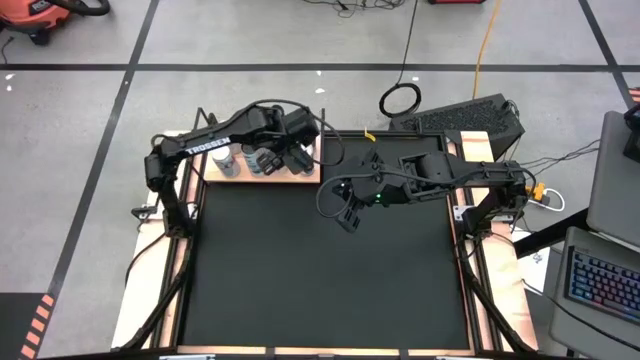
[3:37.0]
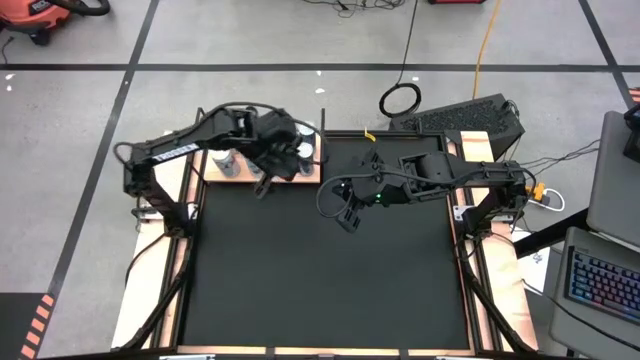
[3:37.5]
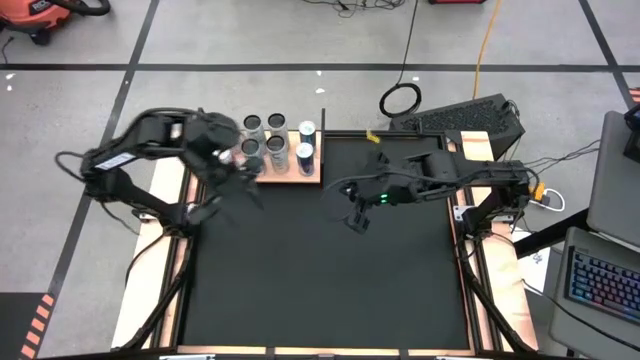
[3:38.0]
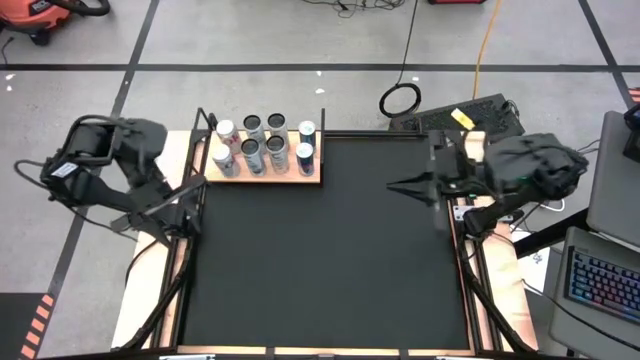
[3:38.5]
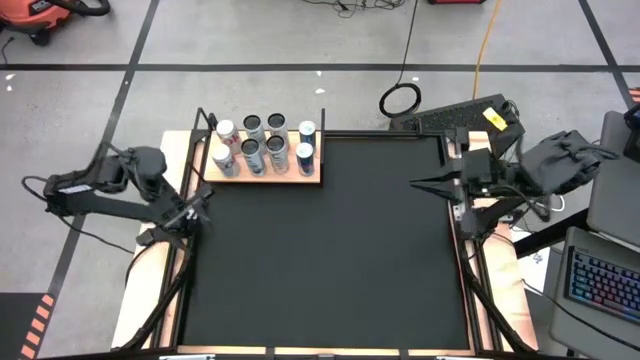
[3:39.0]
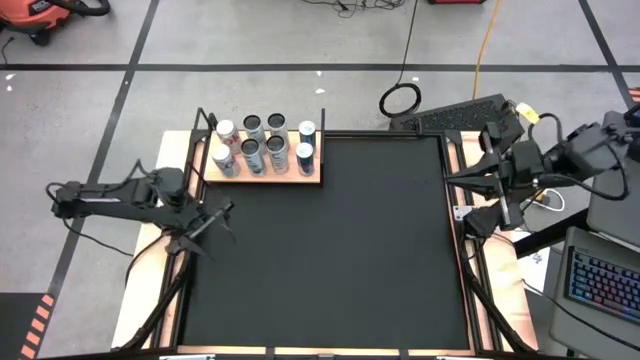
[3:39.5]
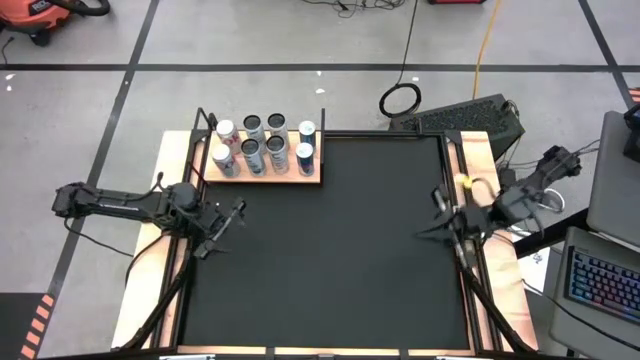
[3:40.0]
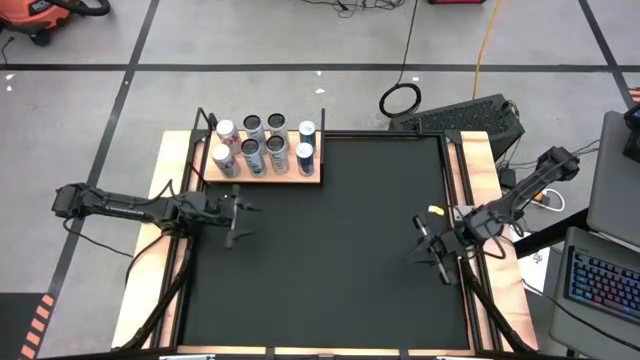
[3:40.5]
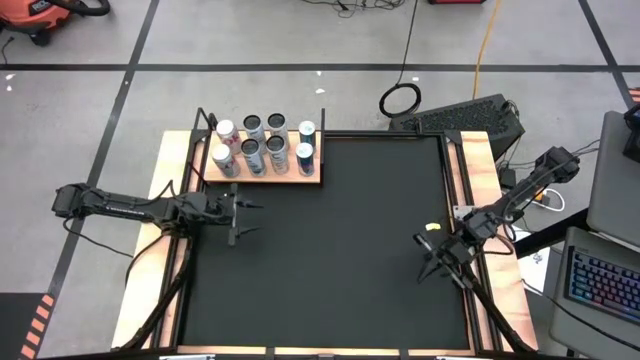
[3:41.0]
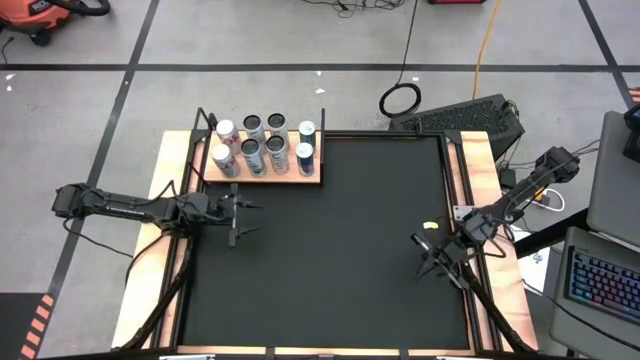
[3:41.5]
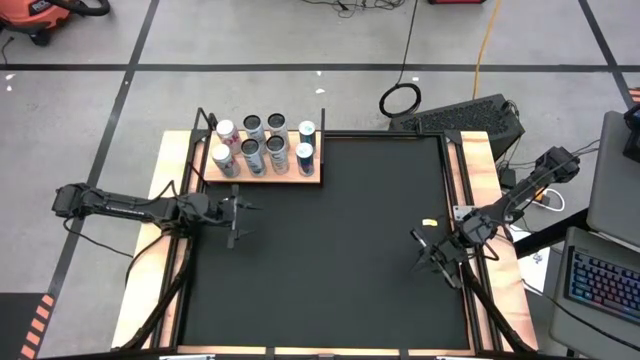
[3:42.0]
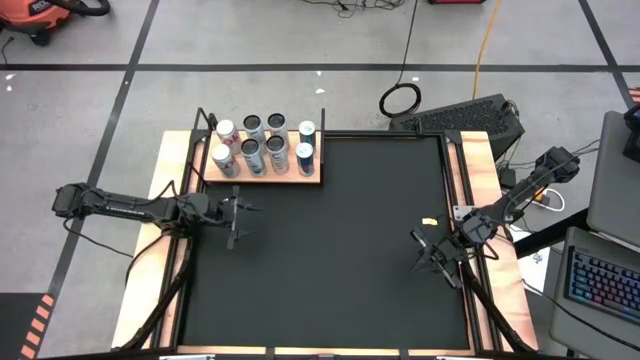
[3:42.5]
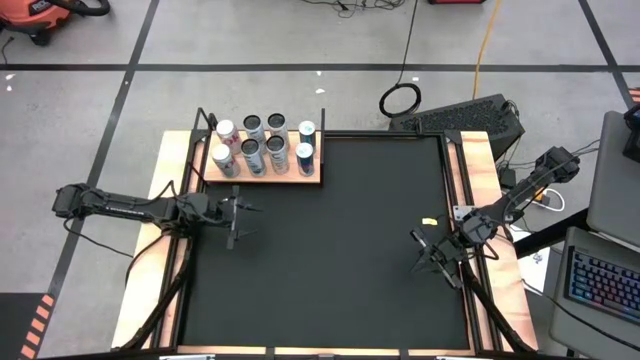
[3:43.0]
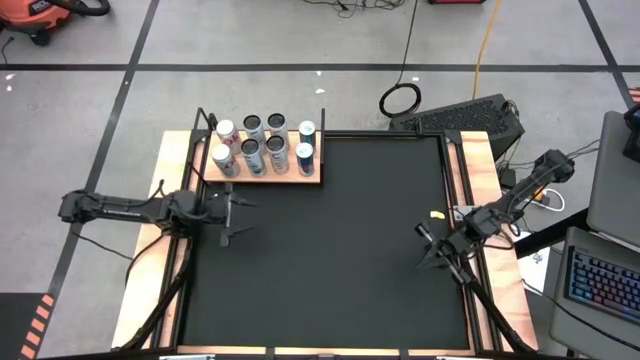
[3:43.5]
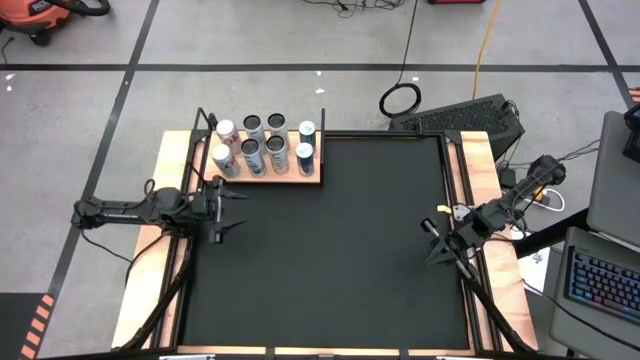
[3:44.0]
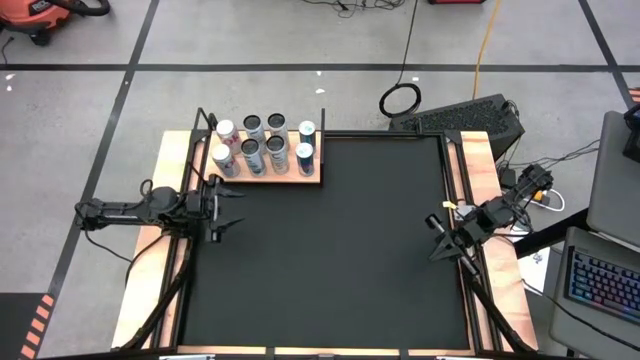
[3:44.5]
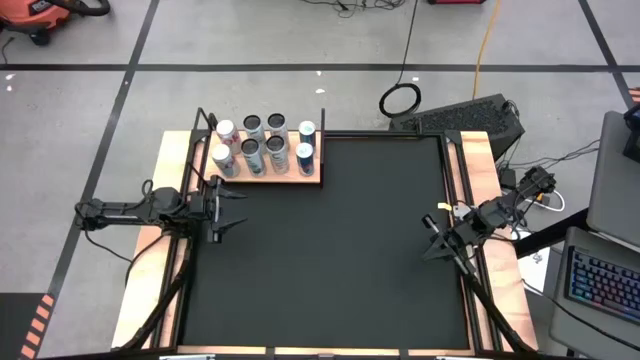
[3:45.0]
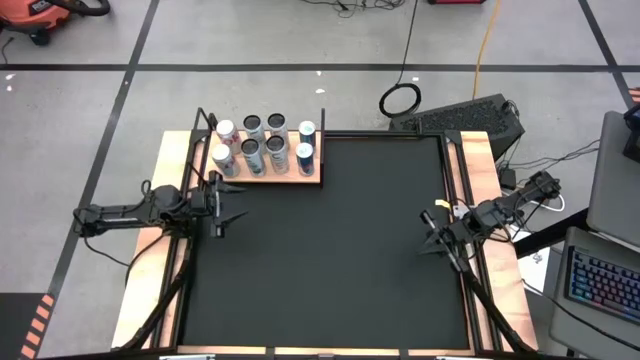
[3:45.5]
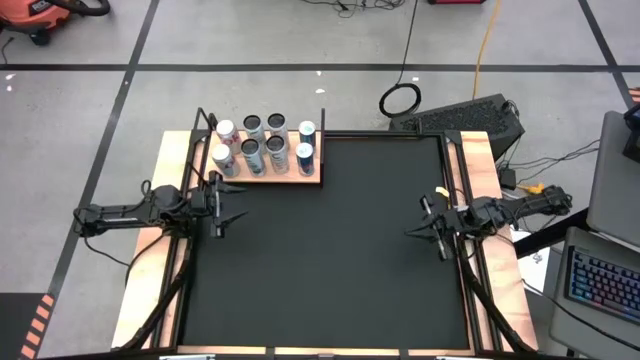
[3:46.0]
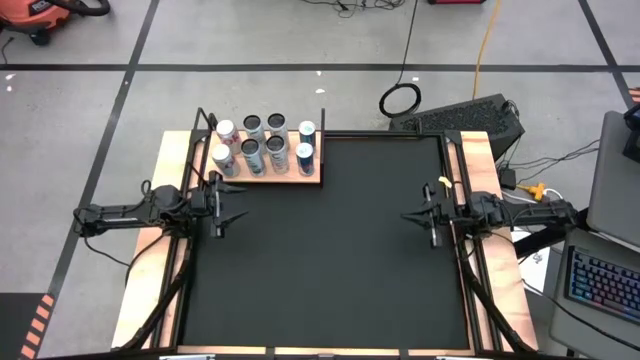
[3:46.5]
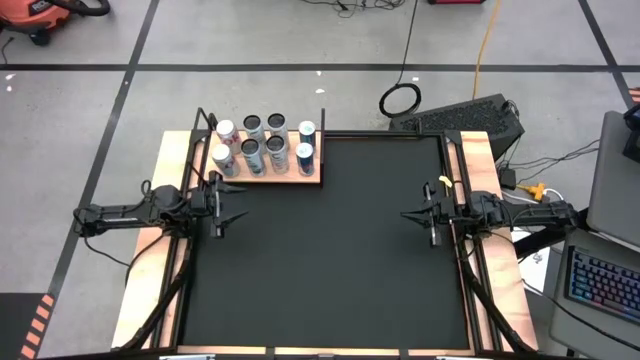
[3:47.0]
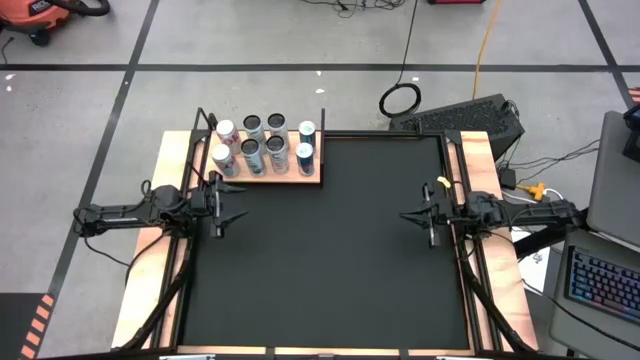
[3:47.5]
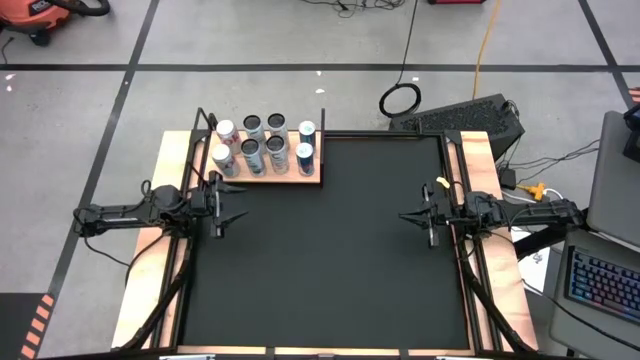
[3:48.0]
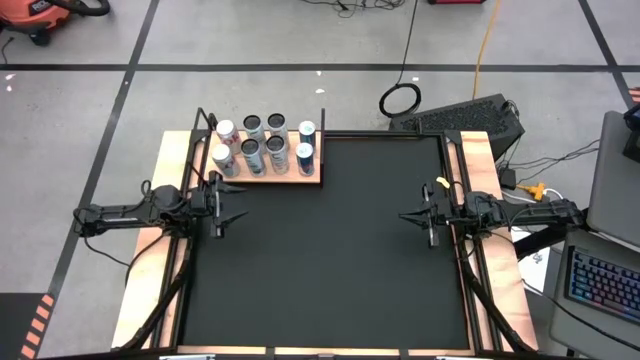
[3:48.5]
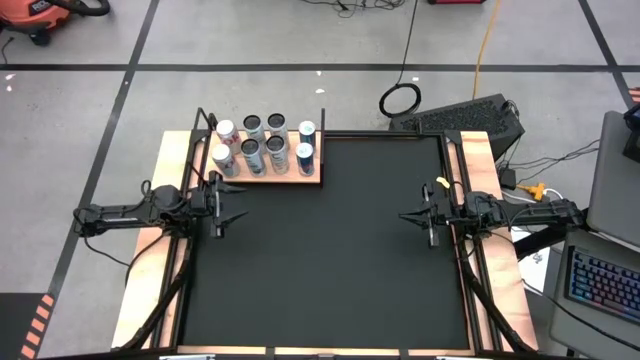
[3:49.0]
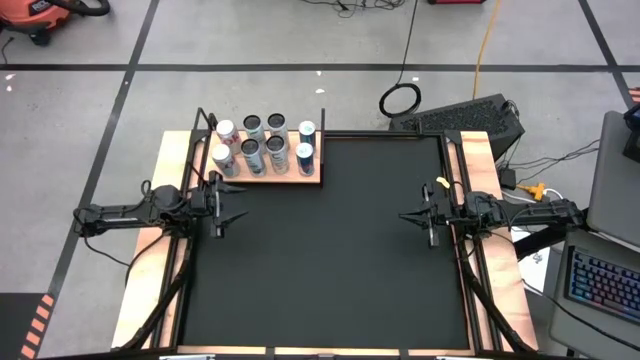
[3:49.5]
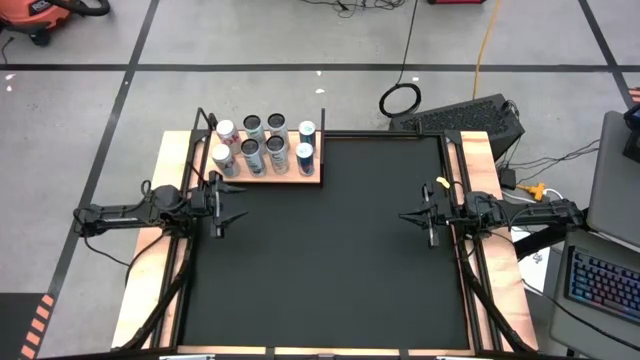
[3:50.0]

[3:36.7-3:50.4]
Task: Place canned beverage on shelf
Return to Home Position

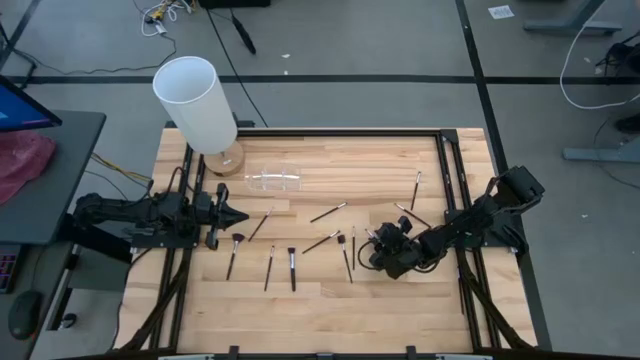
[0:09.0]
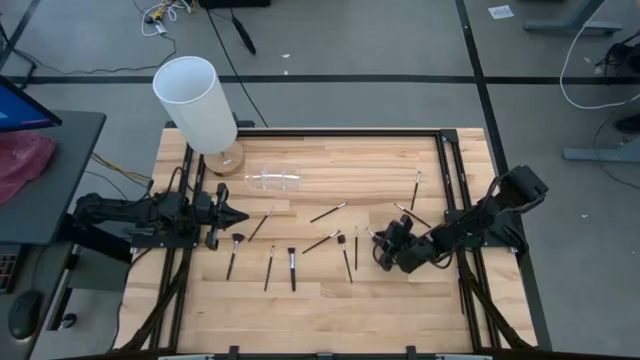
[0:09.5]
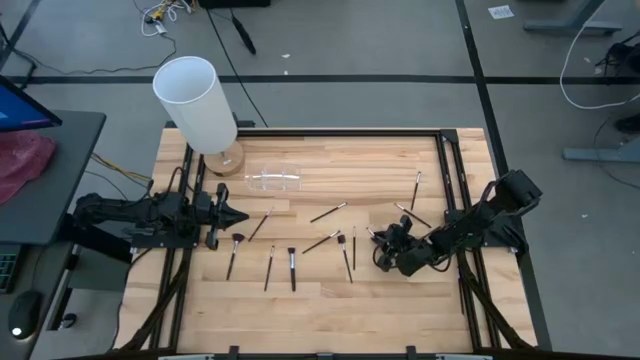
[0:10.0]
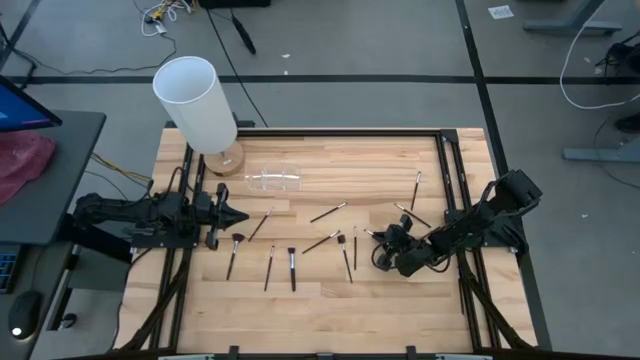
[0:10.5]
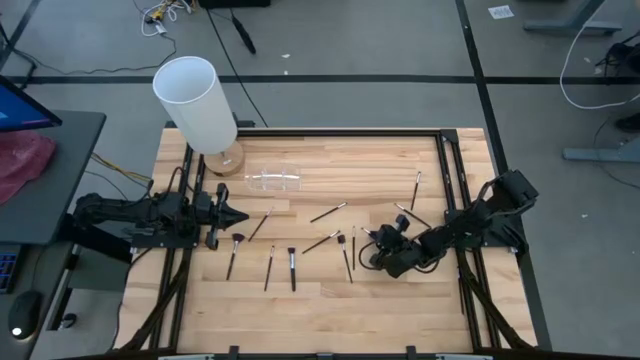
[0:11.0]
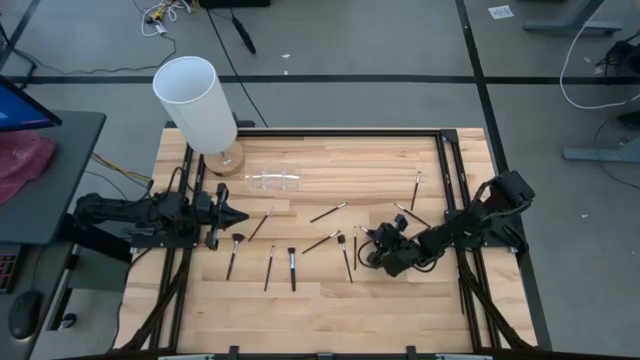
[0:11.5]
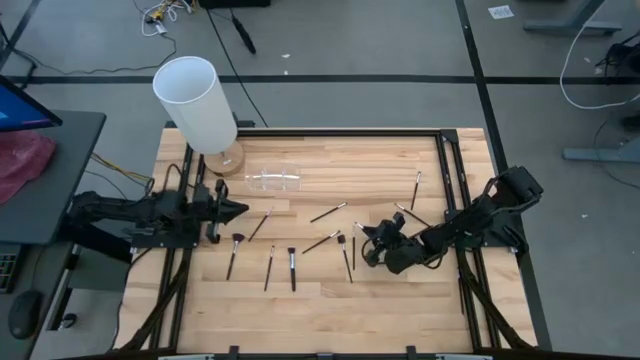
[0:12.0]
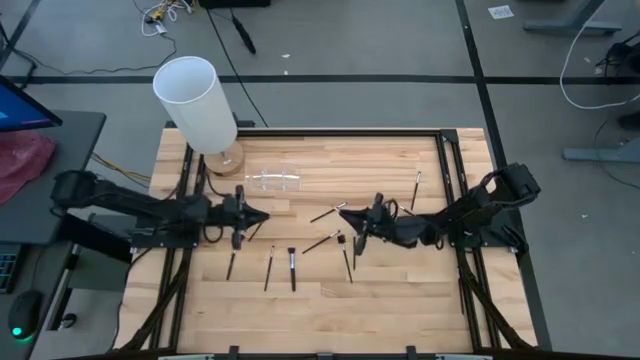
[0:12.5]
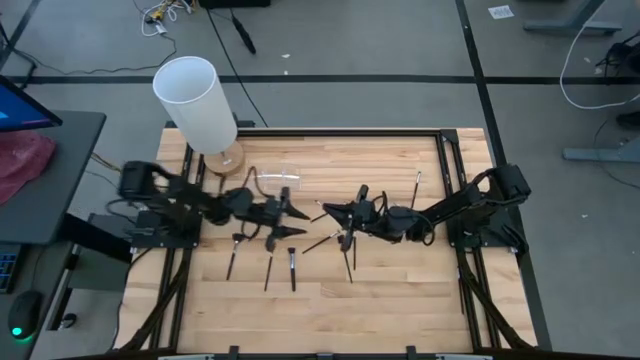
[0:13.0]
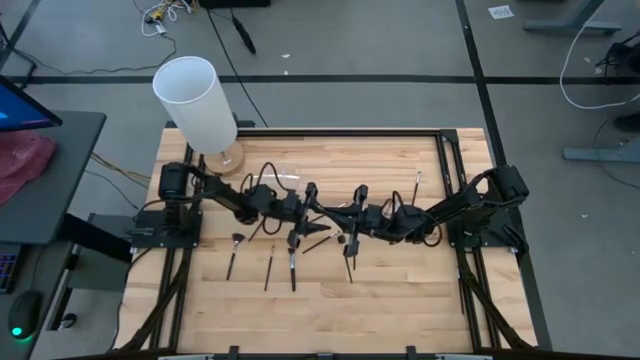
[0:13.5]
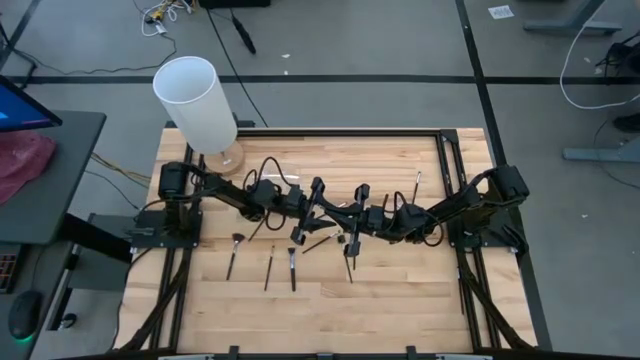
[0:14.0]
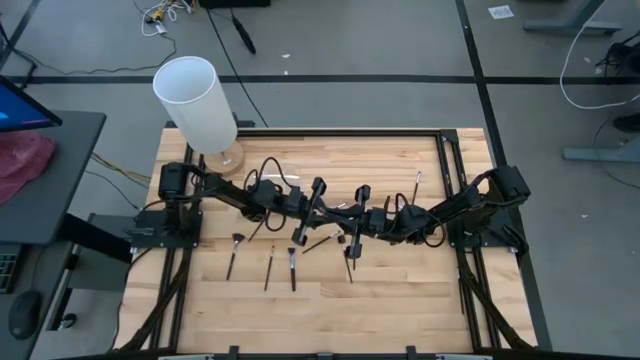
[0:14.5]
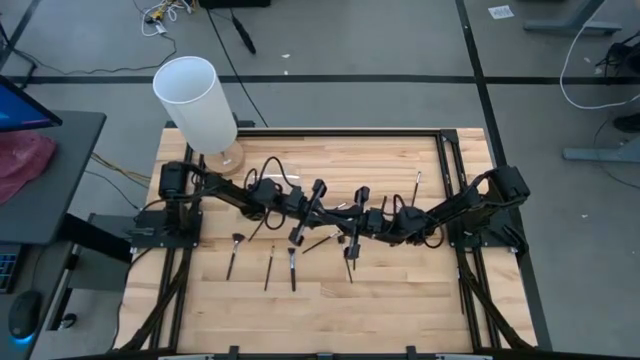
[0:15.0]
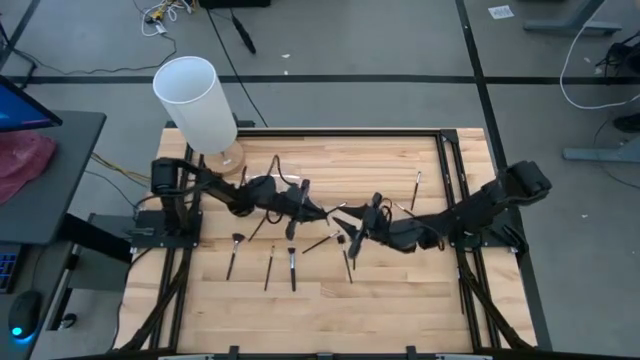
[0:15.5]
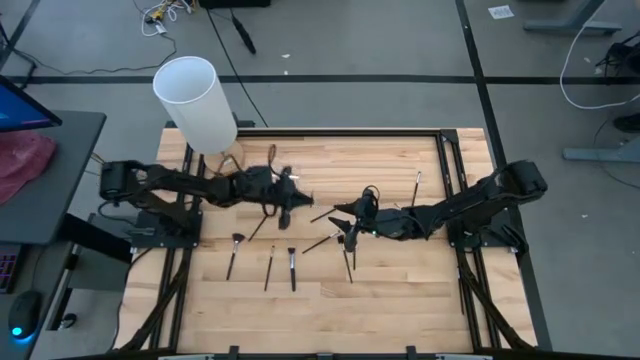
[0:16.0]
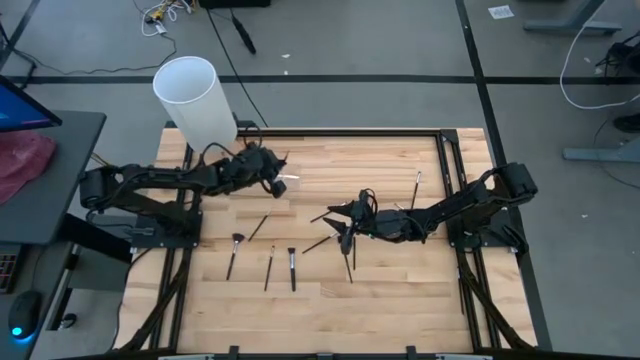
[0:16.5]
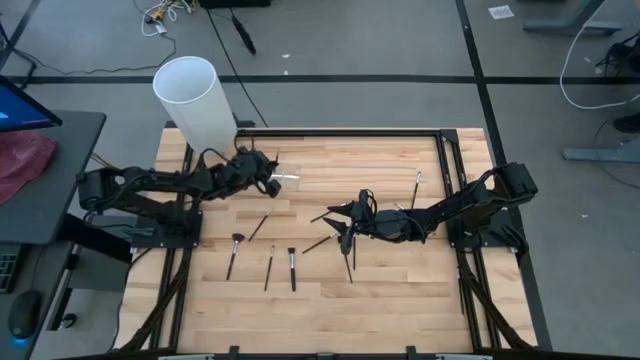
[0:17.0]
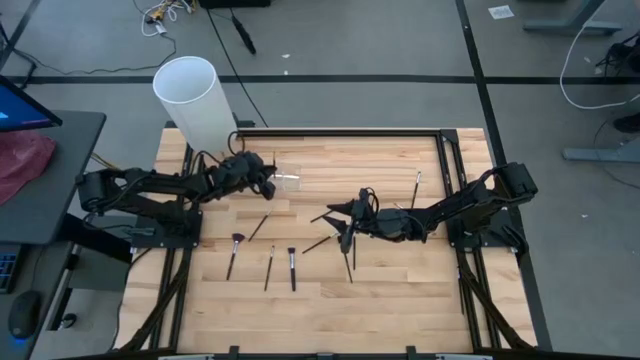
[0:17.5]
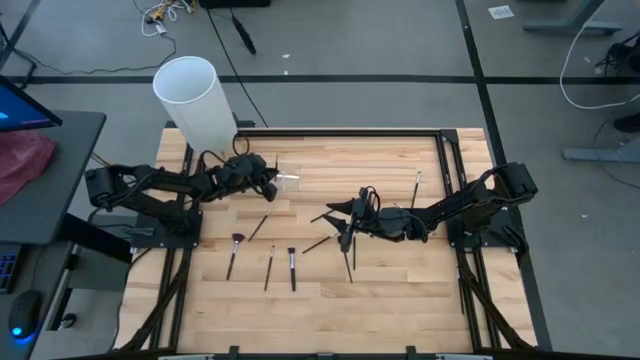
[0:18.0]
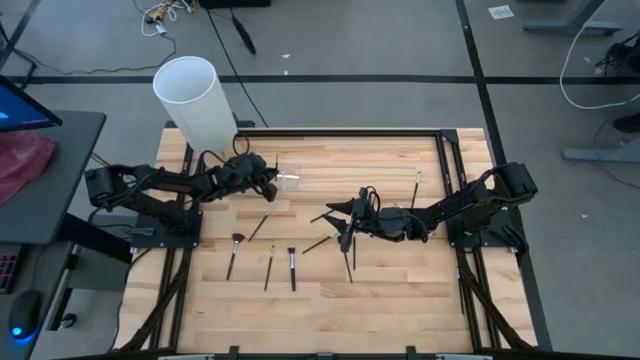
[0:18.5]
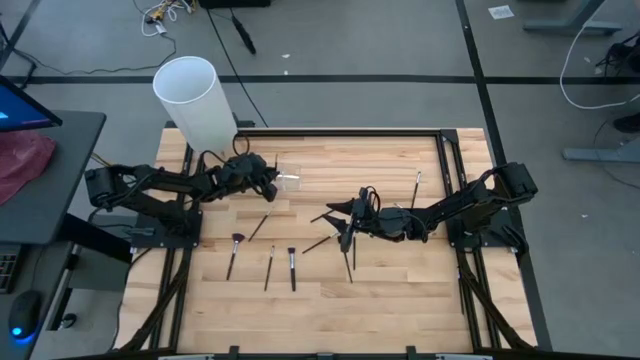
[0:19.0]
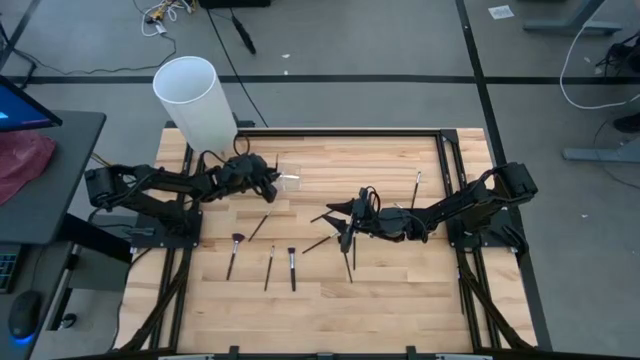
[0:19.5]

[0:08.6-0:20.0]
Task: Put items in baskets/containers
Put the eyeshadow brush into the transparent organizer
